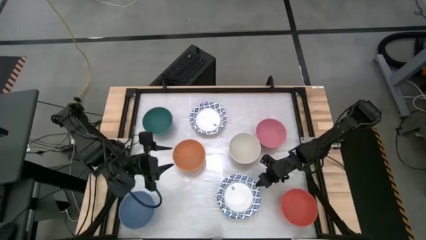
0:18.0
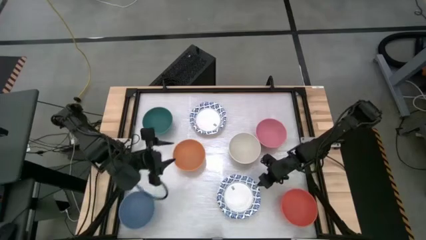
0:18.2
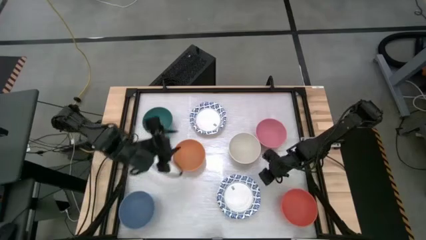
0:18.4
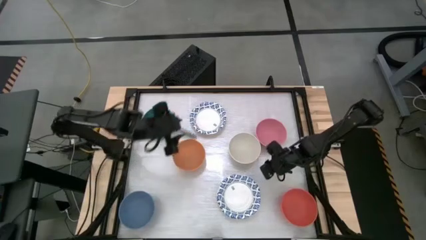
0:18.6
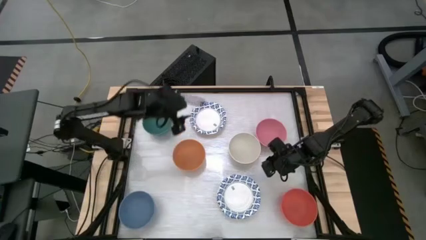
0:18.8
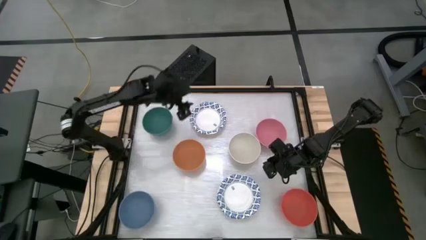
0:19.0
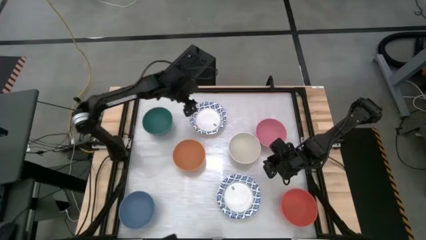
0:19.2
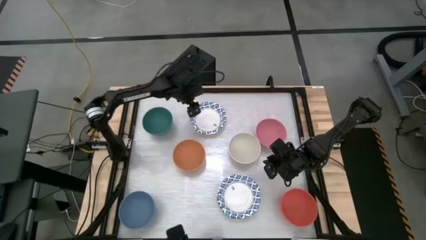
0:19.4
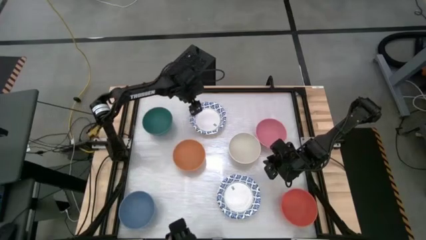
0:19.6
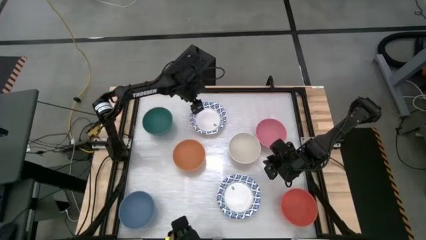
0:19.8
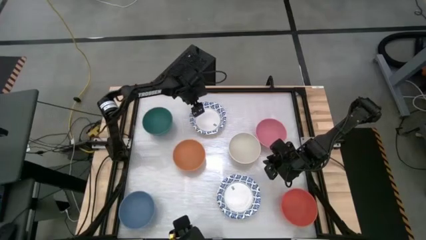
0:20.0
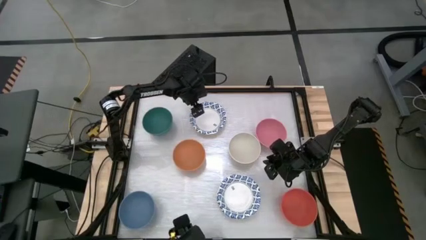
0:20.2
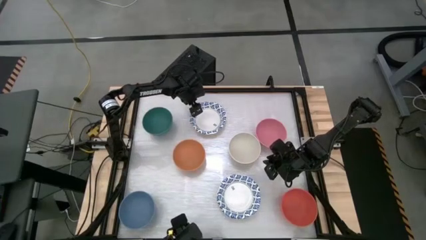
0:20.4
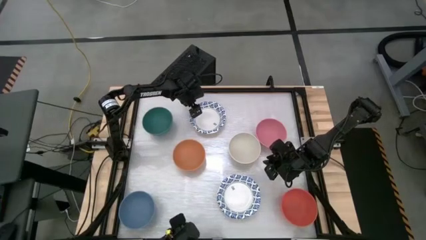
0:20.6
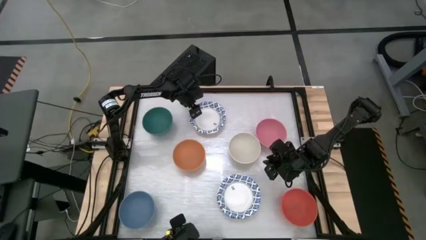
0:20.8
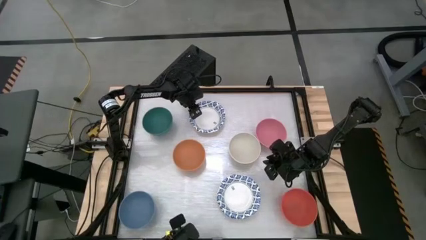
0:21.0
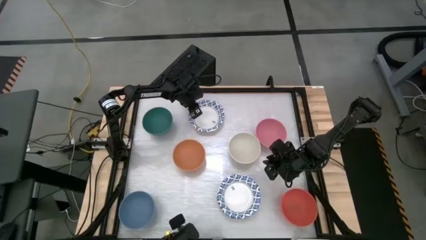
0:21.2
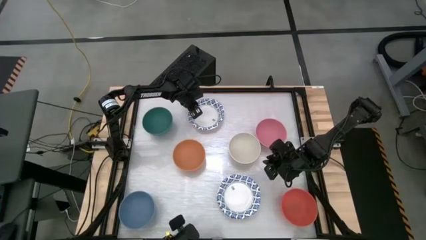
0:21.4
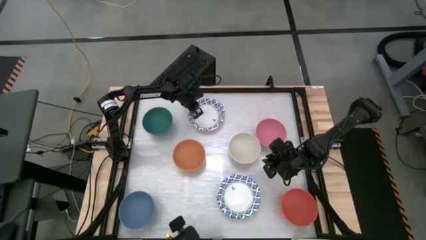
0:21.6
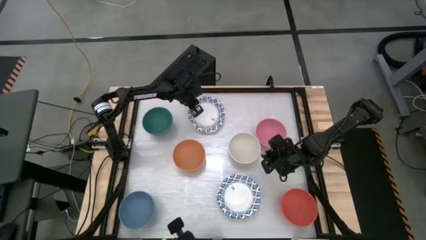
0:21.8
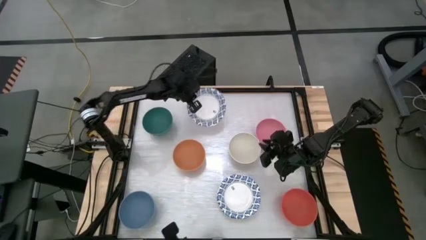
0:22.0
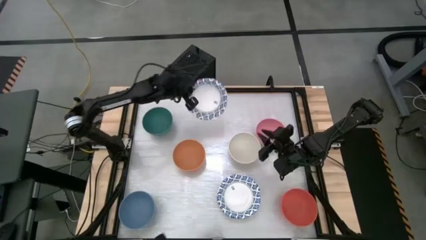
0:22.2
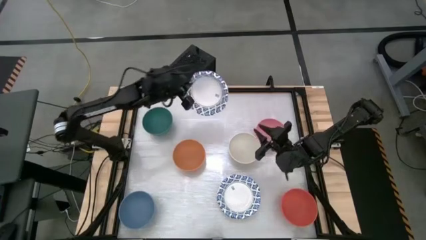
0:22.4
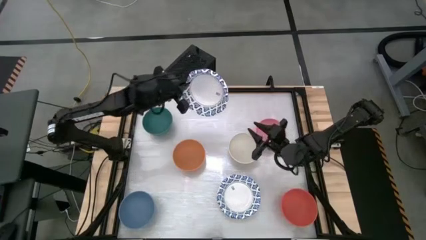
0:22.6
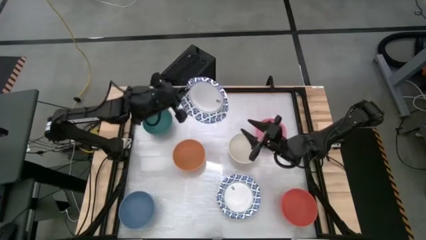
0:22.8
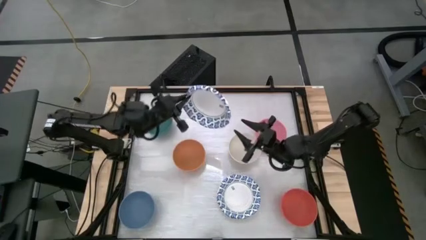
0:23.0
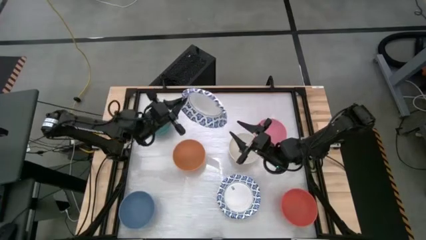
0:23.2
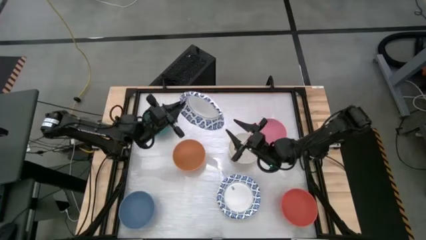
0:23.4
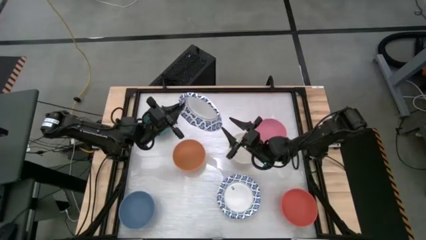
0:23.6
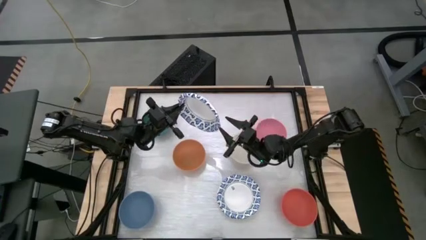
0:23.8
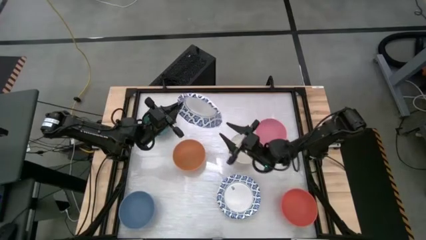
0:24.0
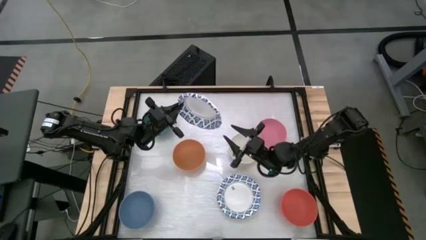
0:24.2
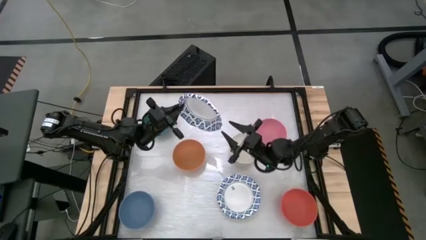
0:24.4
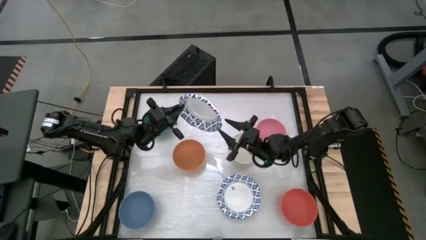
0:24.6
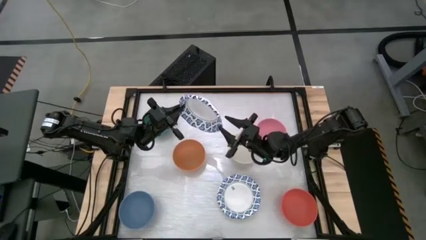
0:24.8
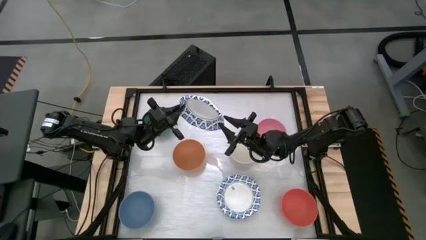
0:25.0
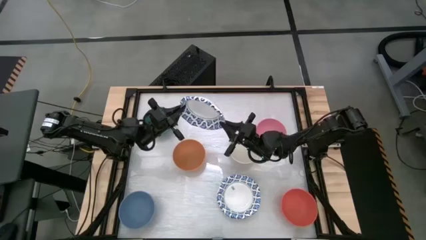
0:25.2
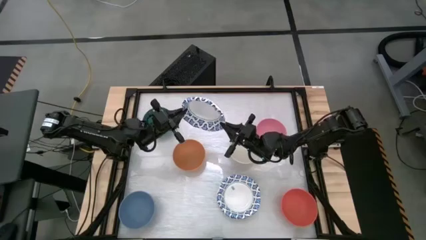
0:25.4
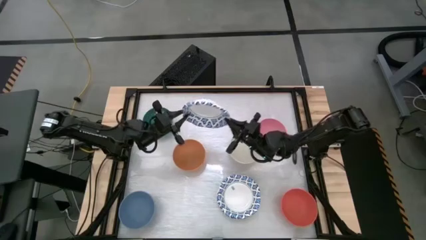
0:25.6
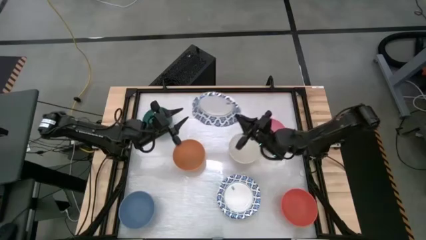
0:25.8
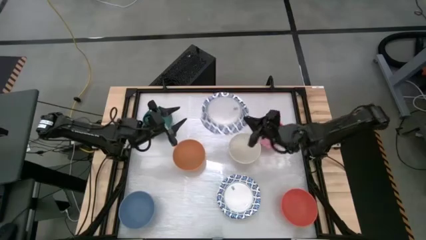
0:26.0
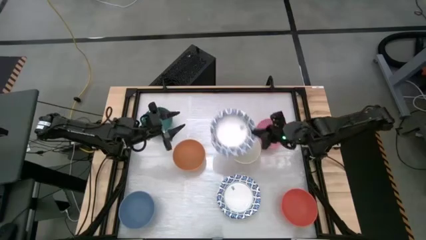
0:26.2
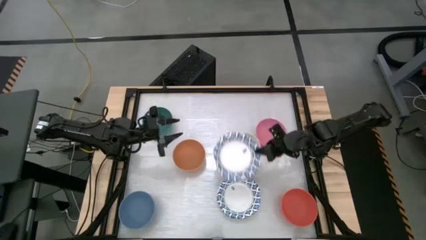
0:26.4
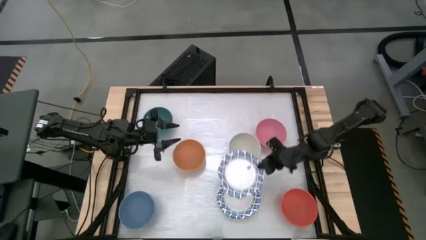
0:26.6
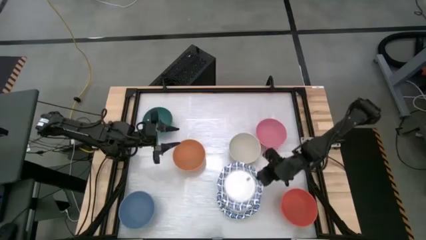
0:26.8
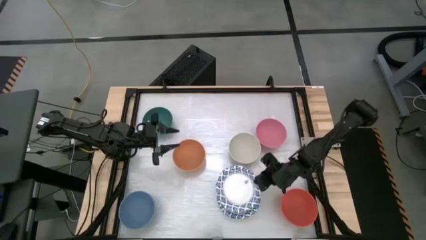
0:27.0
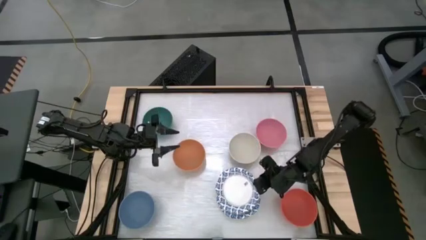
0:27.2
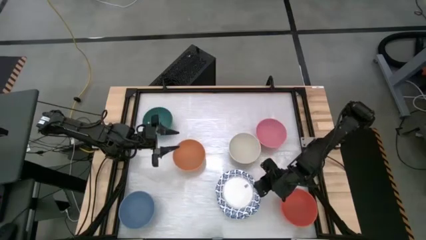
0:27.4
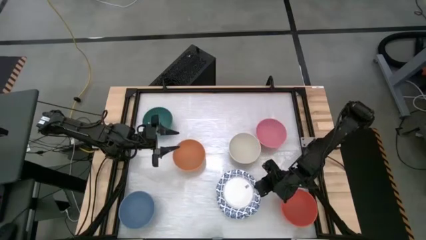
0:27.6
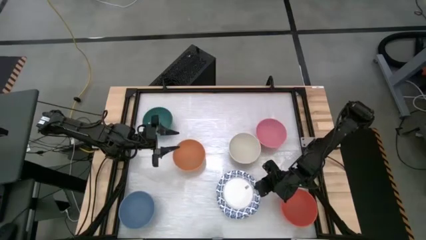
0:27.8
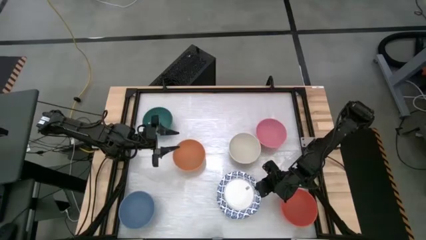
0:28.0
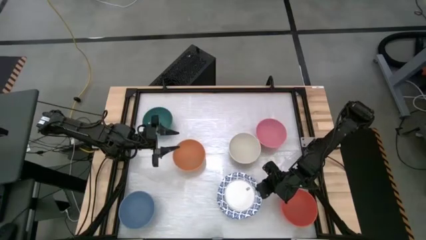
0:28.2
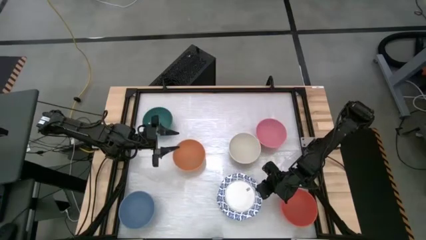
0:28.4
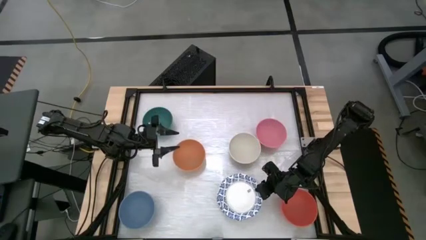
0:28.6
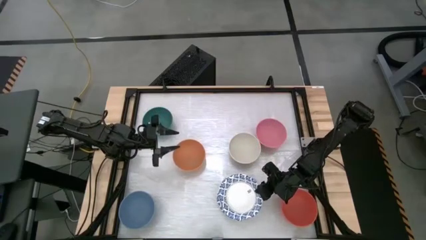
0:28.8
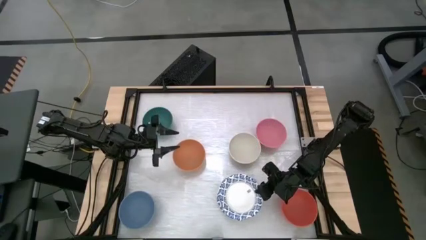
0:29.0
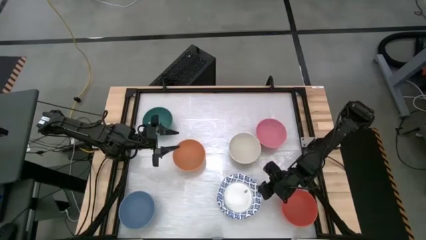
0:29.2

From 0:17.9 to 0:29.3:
Stack the top white paper bowl into the other stacked white paper bowls
